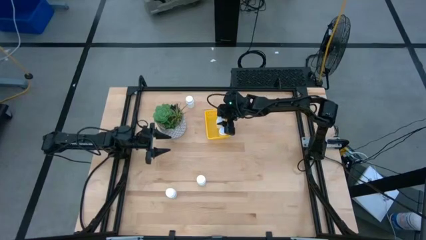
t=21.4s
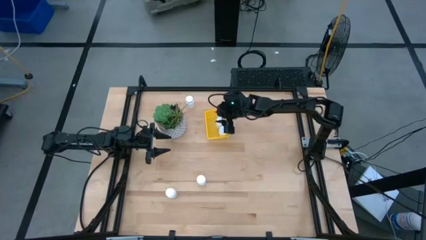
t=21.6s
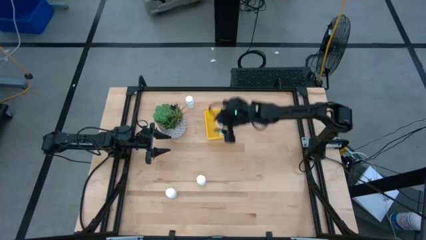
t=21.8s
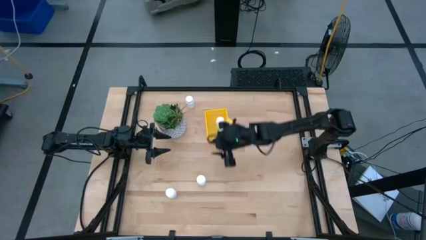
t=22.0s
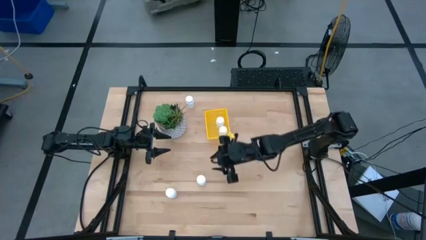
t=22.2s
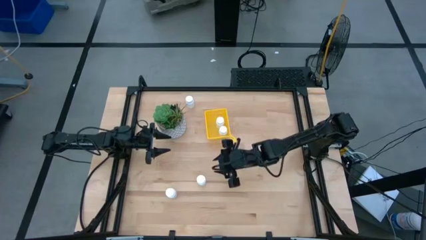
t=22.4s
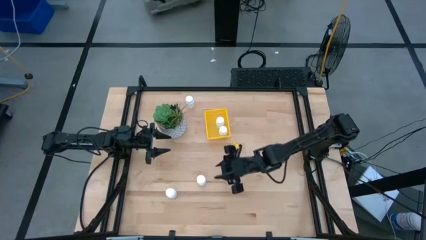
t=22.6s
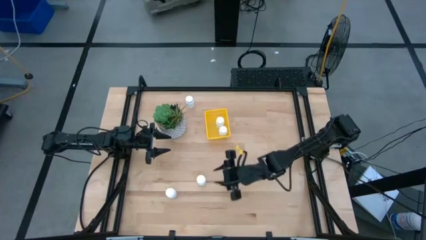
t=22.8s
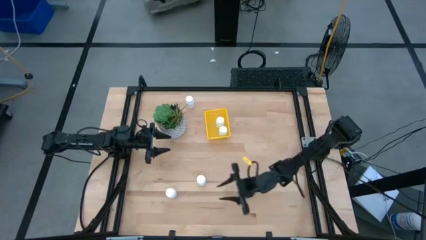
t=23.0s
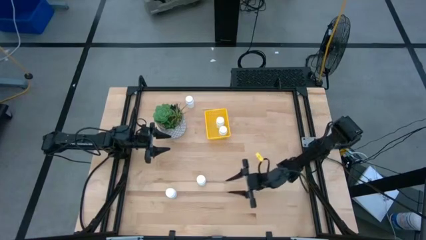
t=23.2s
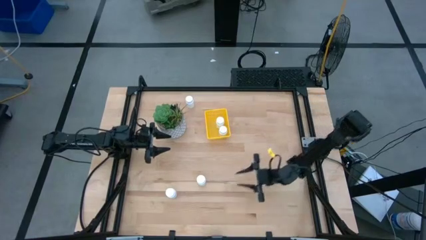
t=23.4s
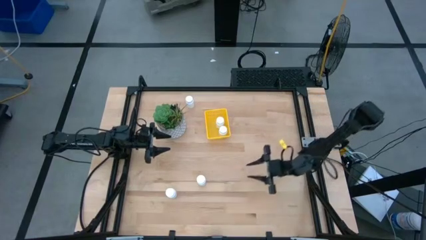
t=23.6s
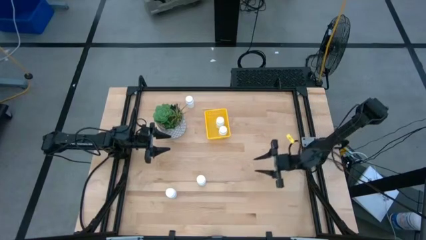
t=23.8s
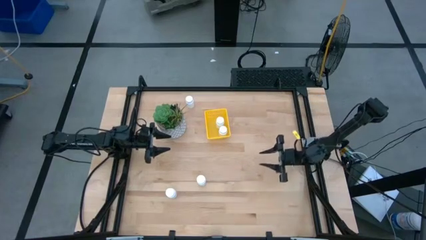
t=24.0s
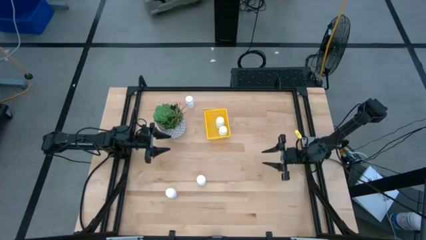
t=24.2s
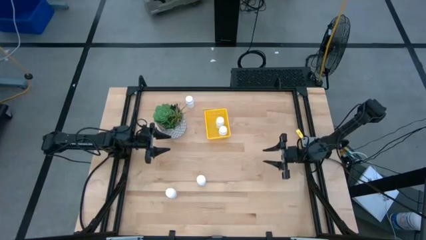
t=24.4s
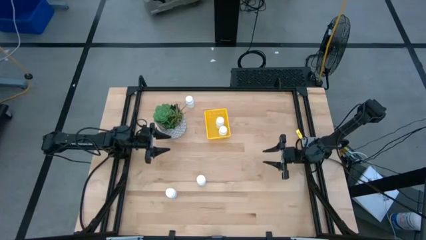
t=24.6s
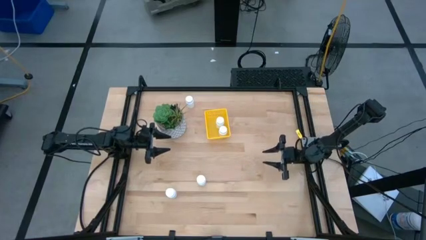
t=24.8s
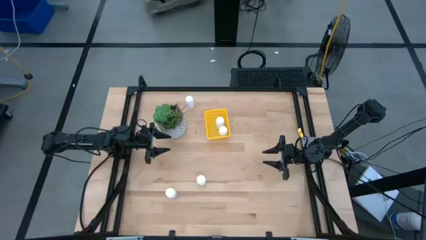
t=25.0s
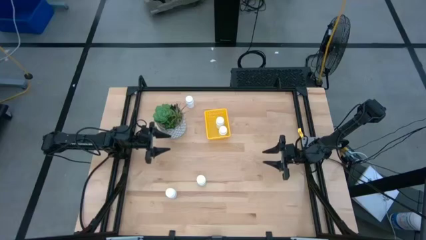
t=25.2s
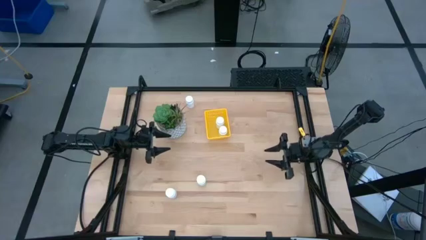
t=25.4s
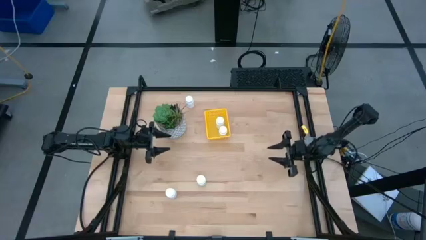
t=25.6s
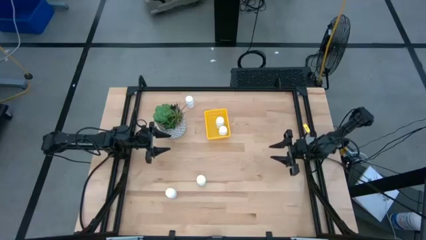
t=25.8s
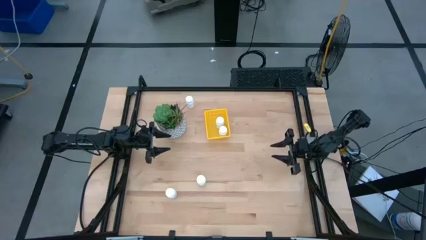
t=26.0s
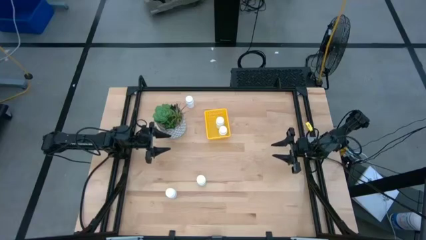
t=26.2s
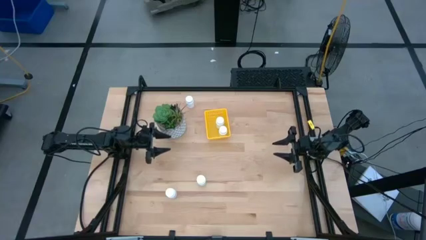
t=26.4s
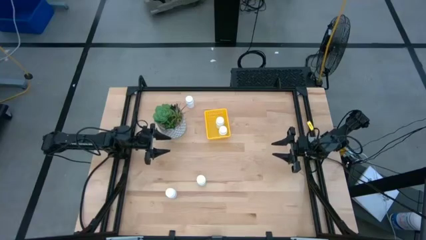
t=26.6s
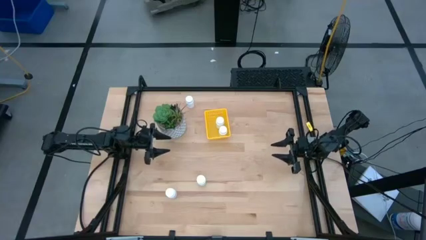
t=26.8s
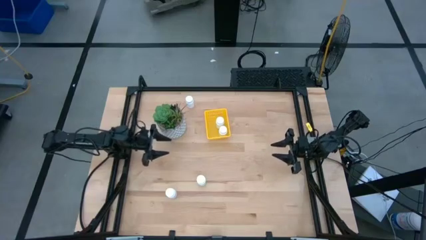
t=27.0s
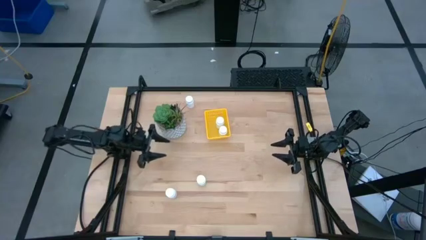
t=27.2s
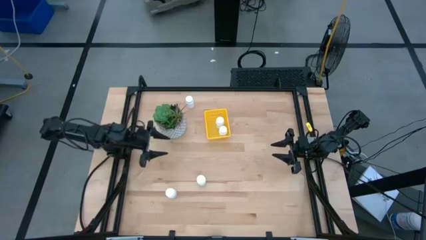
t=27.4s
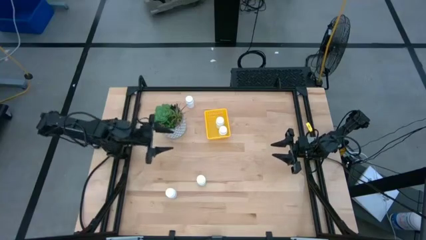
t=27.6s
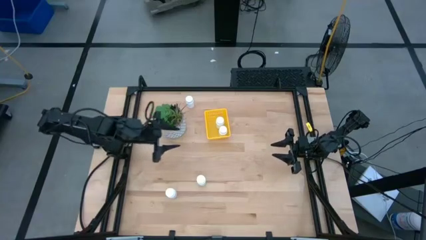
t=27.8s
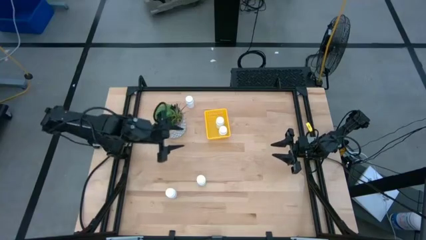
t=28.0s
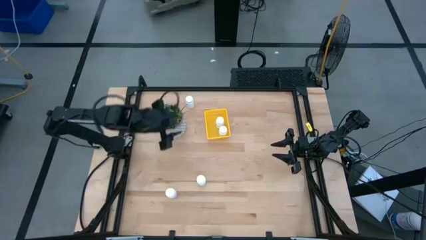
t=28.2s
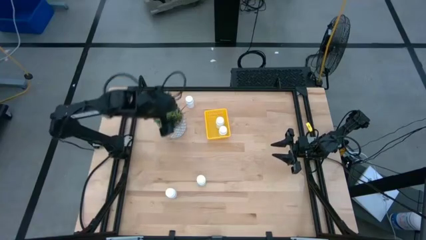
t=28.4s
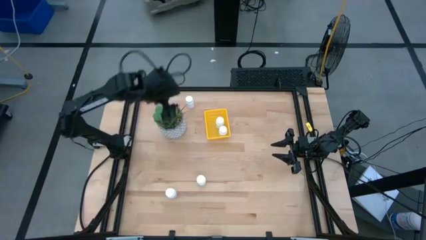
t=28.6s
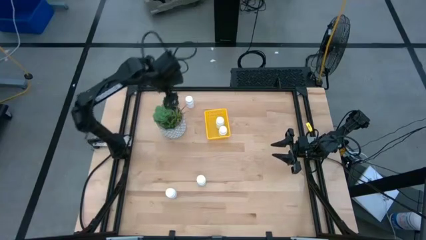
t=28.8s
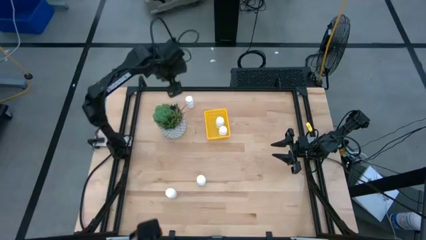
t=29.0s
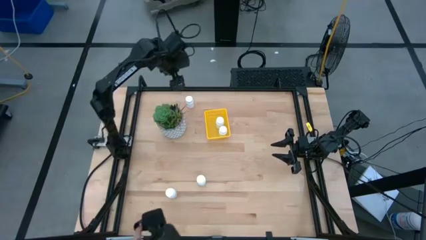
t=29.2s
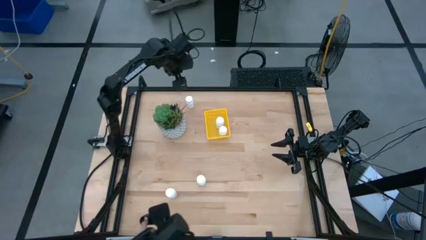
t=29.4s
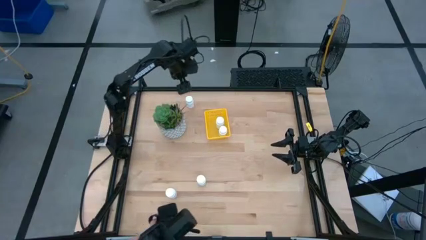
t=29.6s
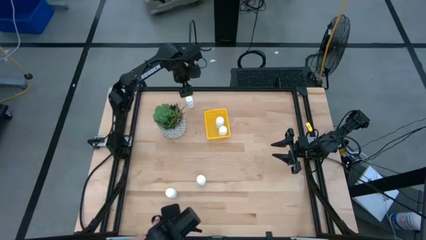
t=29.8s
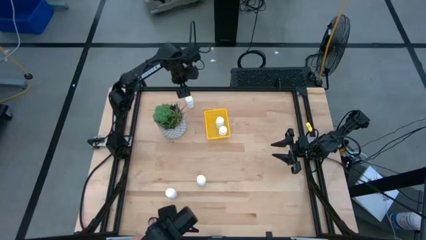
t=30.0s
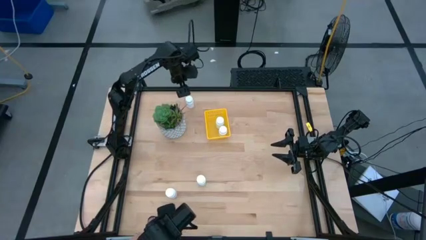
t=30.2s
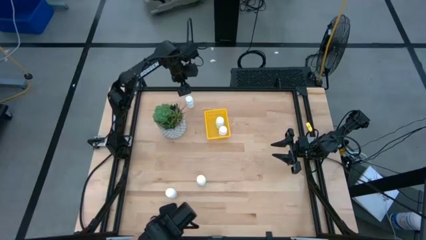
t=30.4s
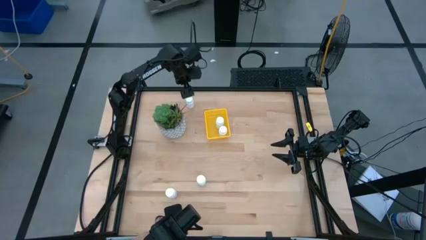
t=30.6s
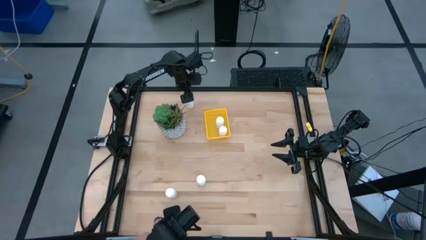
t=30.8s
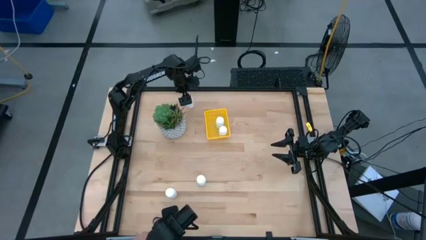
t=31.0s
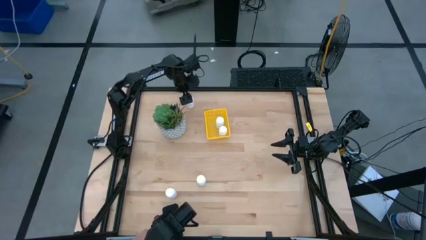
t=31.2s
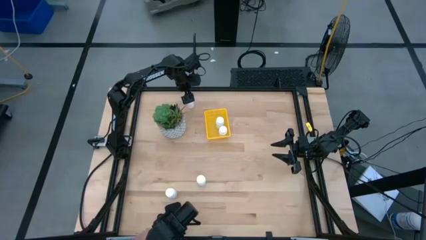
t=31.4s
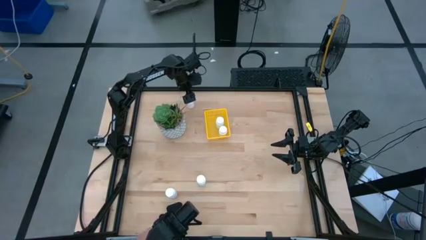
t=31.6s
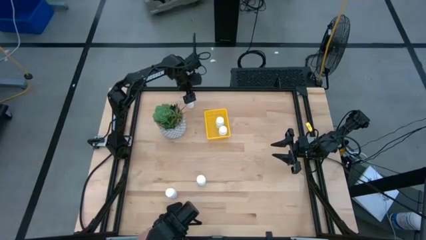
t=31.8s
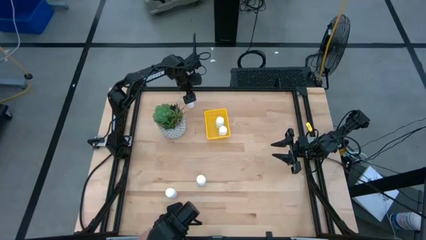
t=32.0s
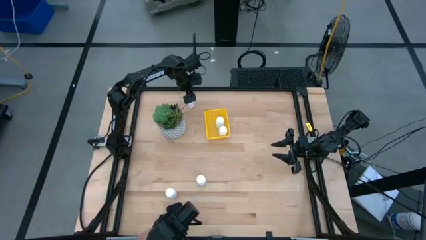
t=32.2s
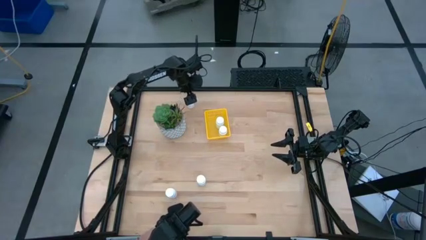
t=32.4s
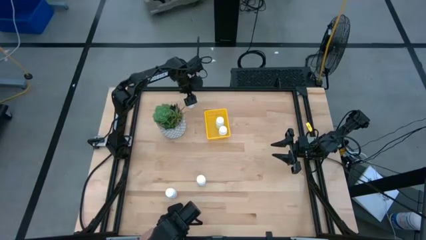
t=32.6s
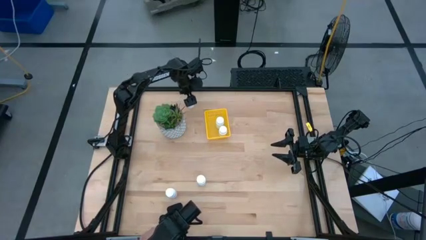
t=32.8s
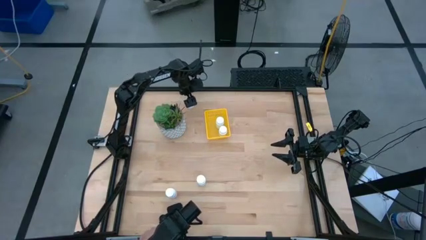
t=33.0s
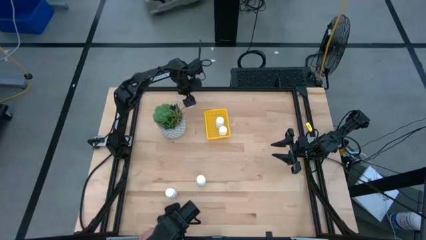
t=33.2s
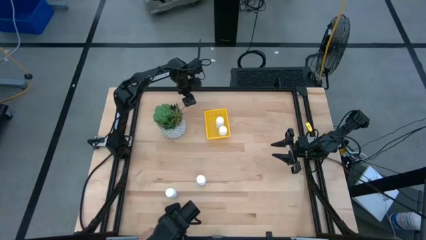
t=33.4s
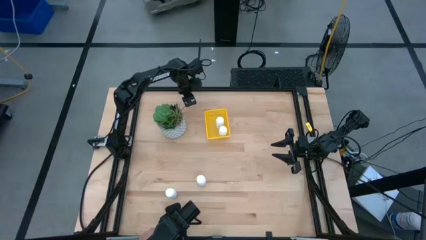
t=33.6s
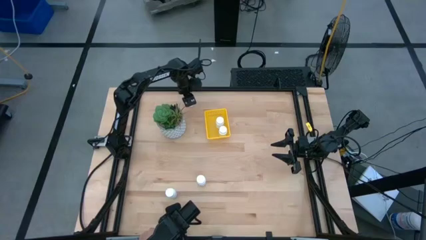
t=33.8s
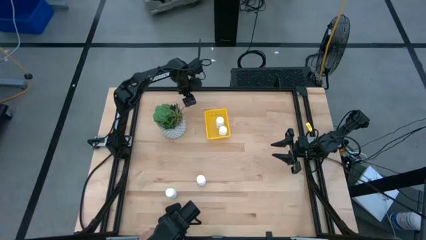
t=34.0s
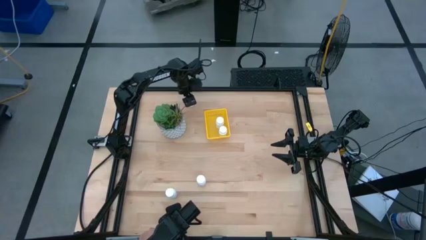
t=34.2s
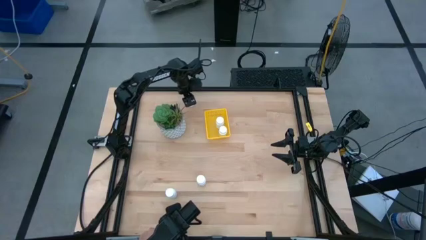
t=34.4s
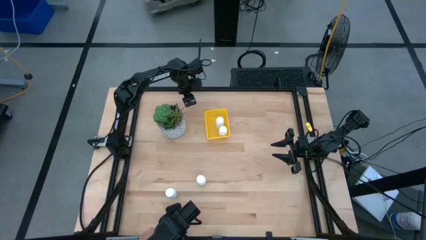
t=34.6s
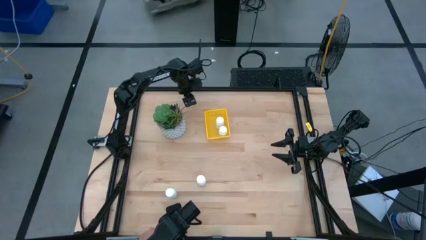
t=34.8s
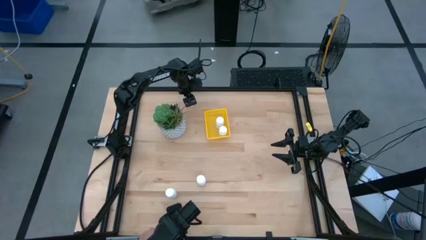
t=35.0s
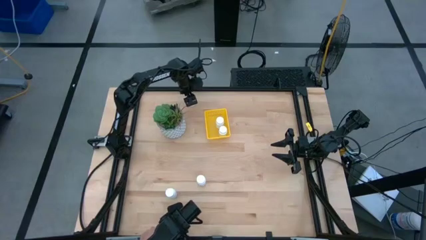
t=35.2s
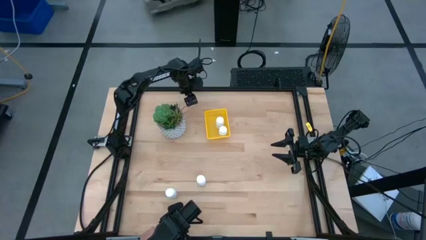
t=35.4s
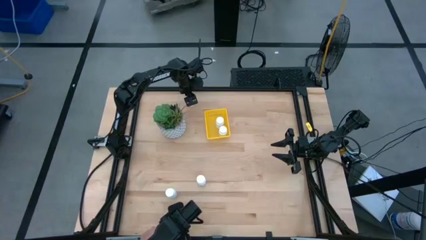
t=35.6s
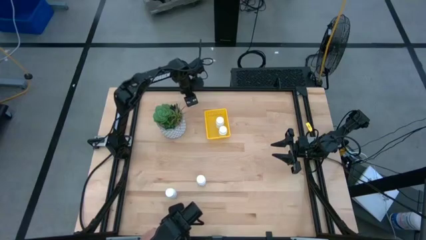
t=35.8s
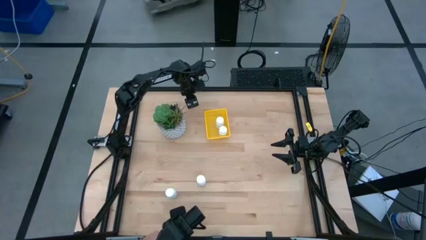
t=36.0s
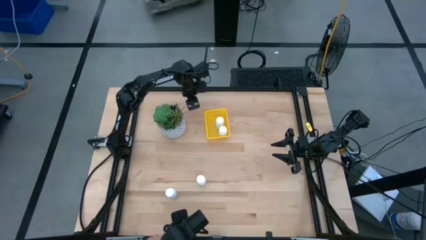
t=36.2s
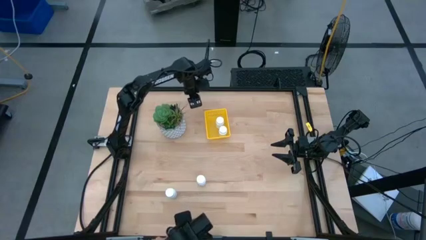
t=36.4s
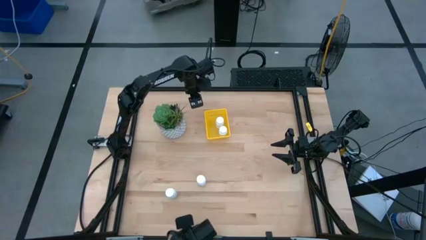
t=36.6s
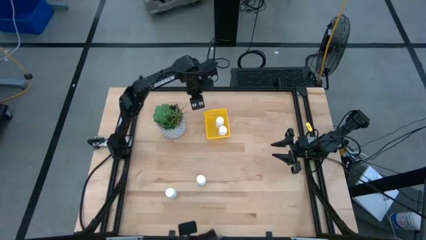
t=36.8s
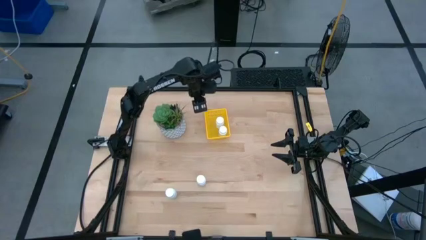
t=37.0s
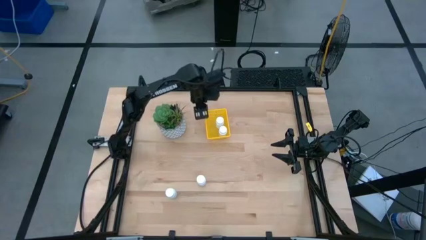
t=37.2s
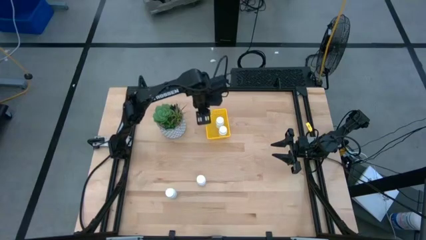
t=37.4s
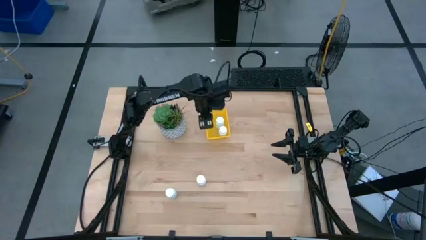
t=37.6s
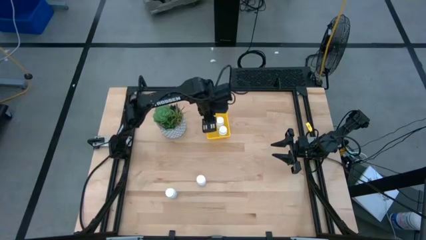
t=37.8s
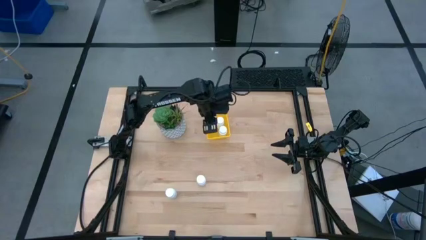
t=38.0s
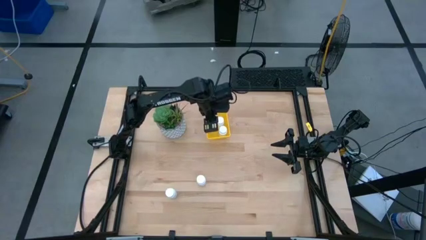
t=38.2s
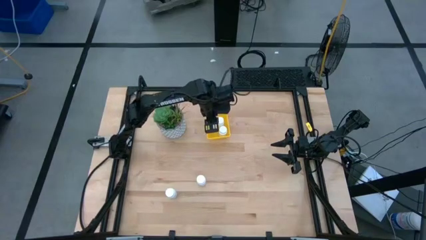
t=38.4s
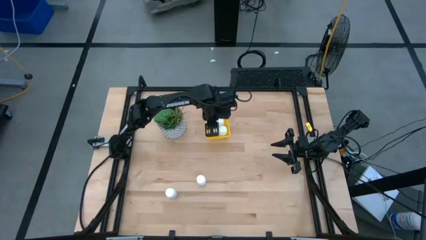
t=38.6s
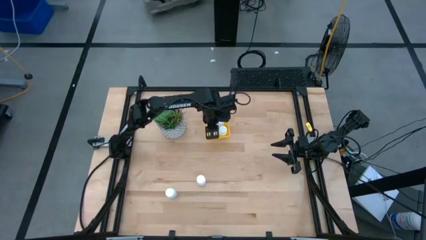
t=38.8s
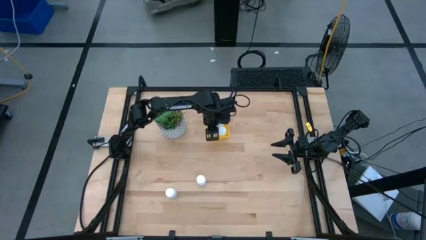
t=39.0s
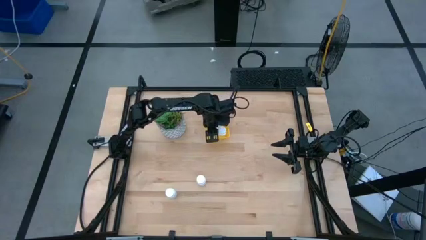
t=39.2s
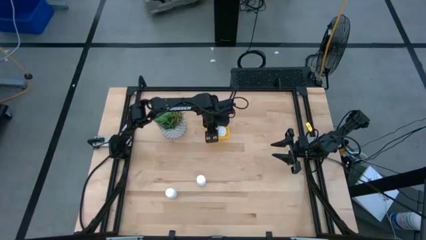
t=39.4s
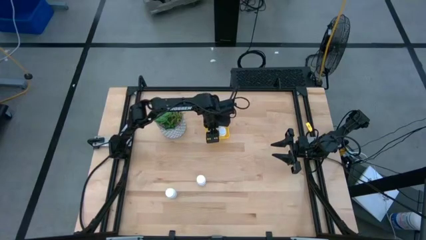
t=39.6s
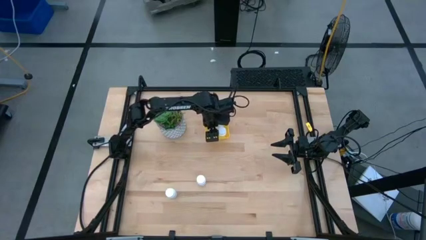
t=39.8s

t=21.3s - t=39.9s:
Task: Pick and place pill bottles into a basket
Put the white pill bottle into the yellow bin
